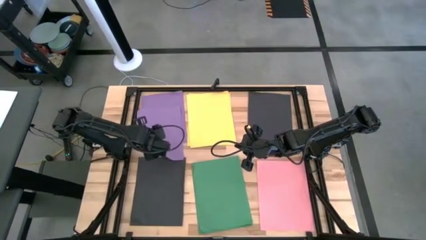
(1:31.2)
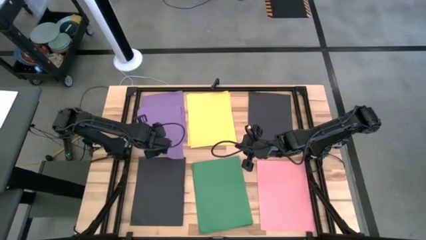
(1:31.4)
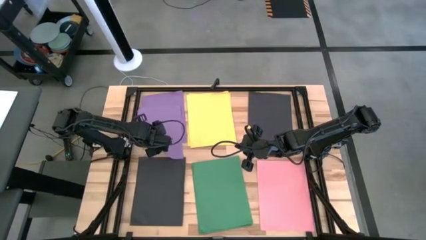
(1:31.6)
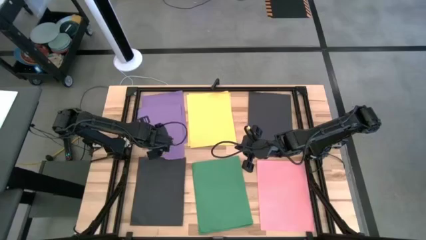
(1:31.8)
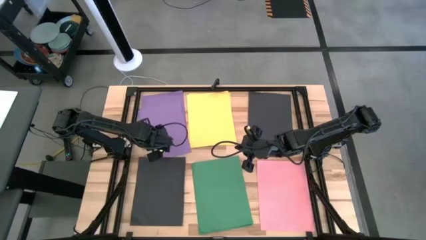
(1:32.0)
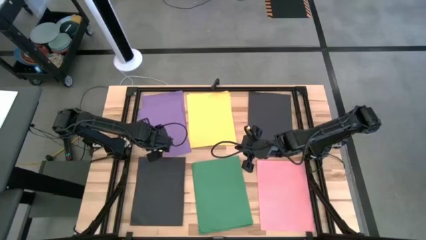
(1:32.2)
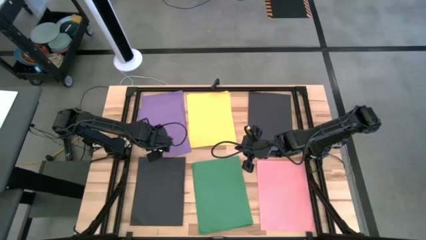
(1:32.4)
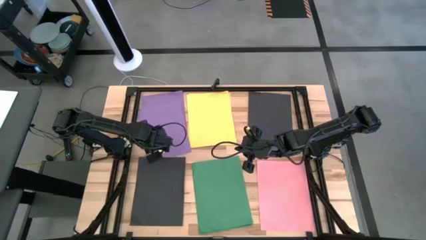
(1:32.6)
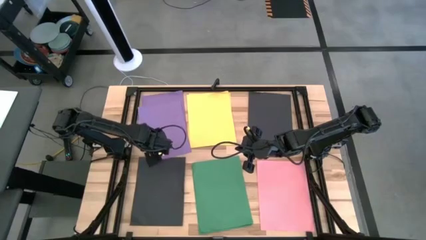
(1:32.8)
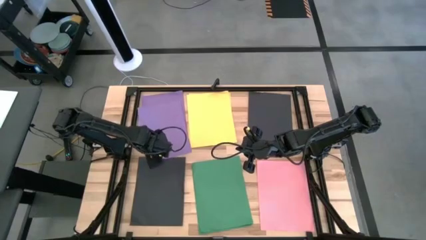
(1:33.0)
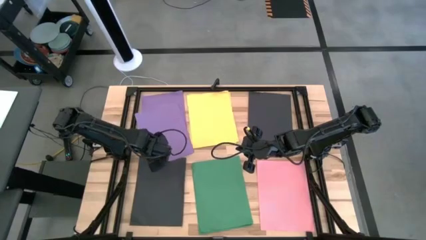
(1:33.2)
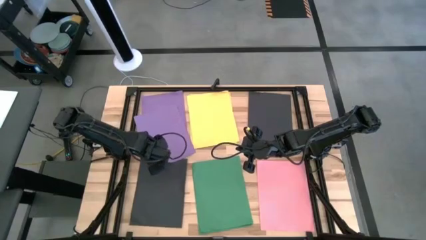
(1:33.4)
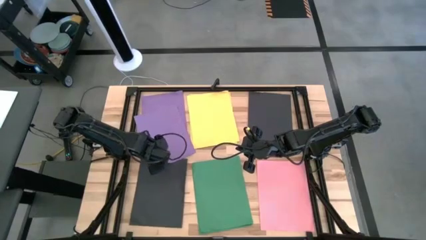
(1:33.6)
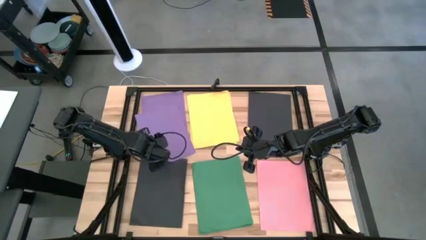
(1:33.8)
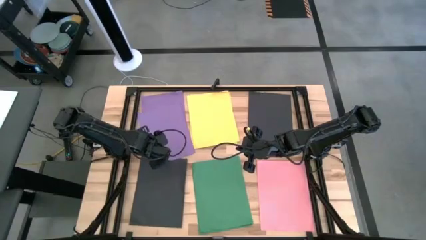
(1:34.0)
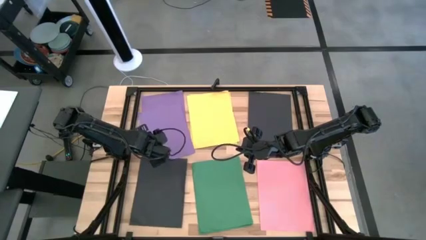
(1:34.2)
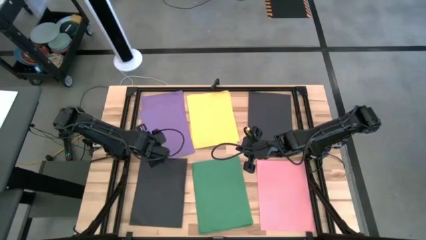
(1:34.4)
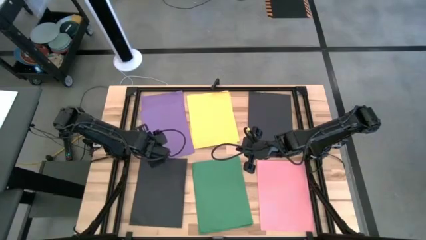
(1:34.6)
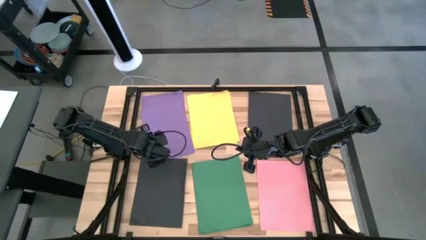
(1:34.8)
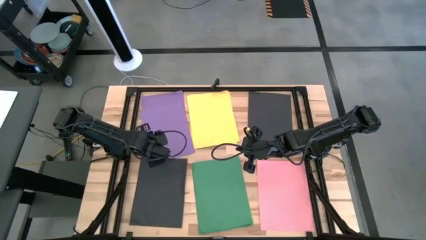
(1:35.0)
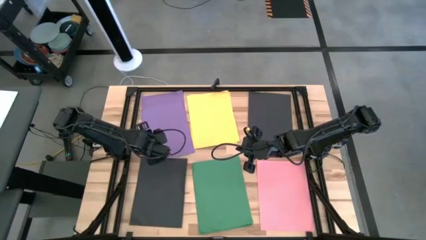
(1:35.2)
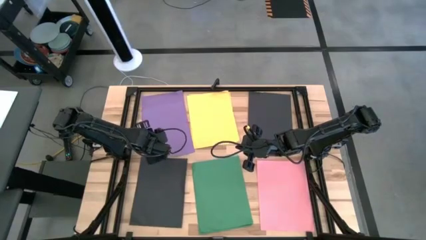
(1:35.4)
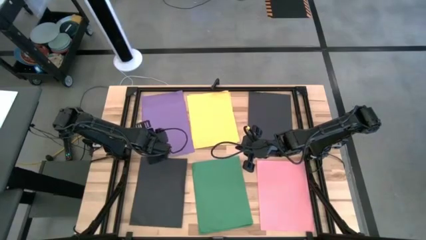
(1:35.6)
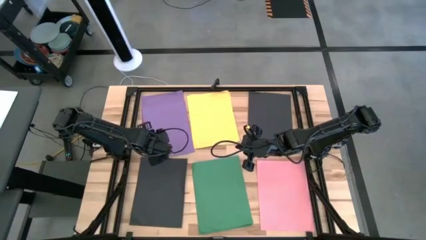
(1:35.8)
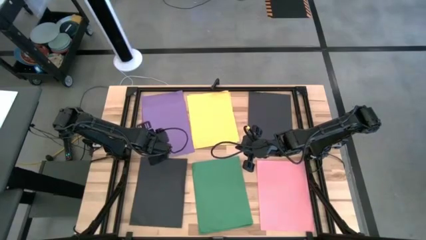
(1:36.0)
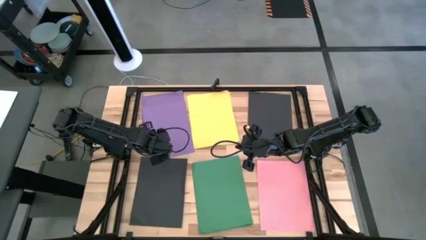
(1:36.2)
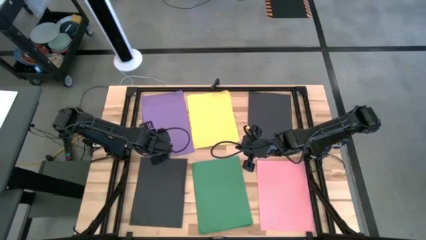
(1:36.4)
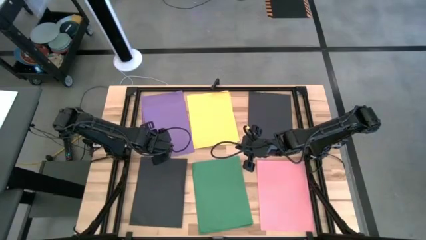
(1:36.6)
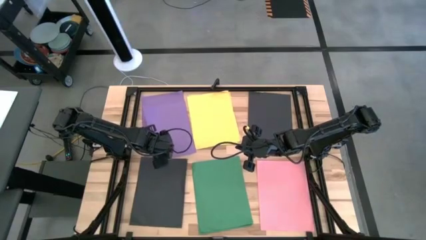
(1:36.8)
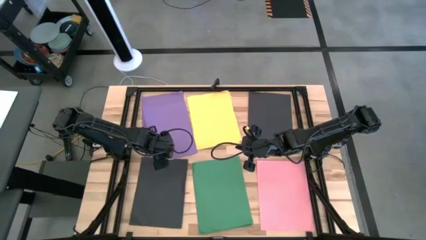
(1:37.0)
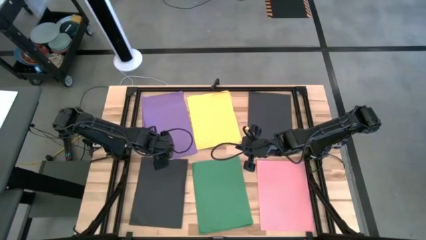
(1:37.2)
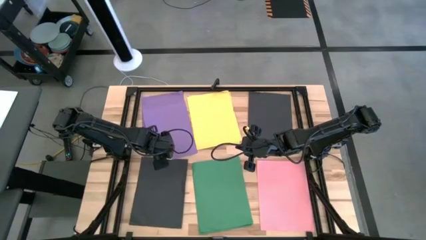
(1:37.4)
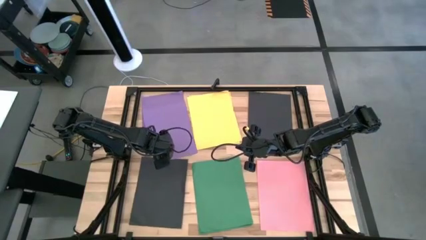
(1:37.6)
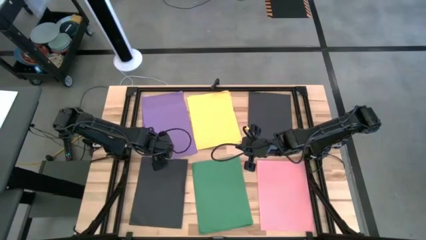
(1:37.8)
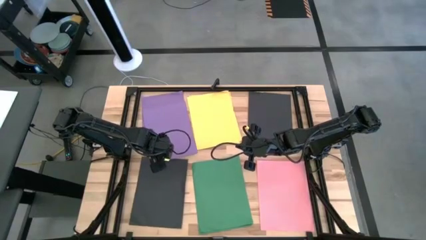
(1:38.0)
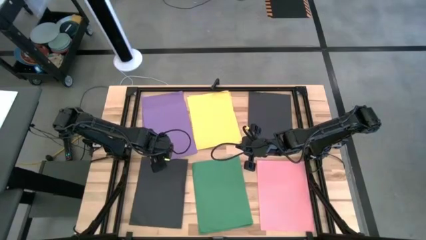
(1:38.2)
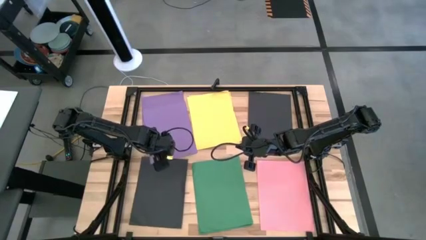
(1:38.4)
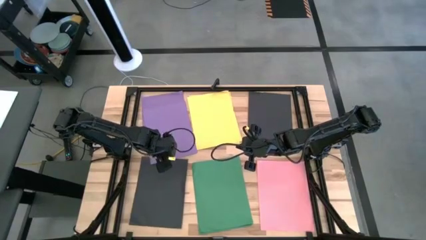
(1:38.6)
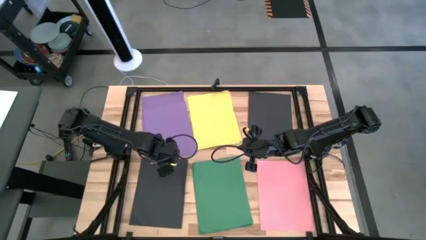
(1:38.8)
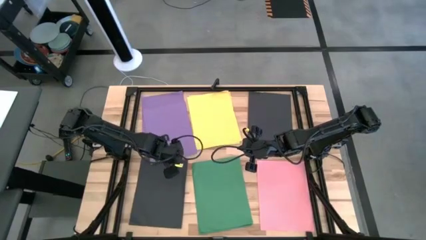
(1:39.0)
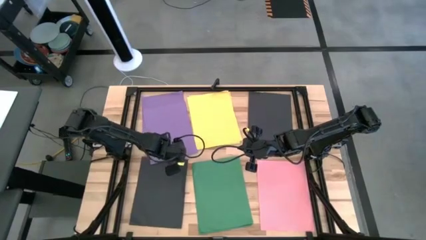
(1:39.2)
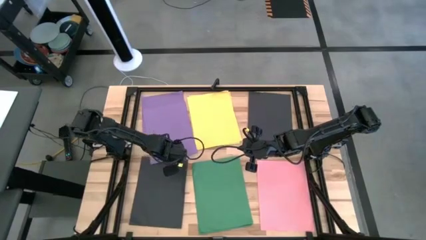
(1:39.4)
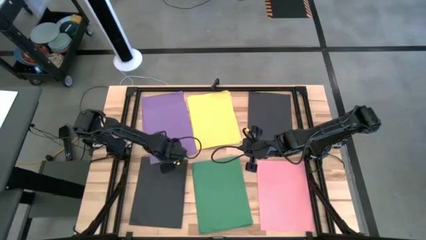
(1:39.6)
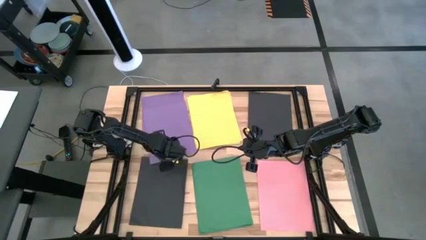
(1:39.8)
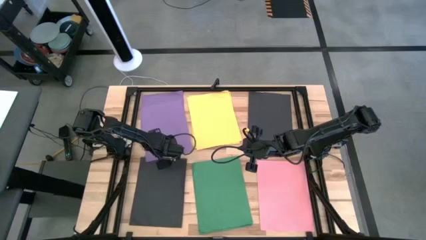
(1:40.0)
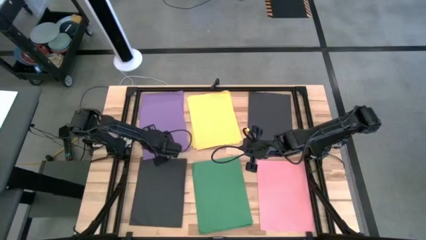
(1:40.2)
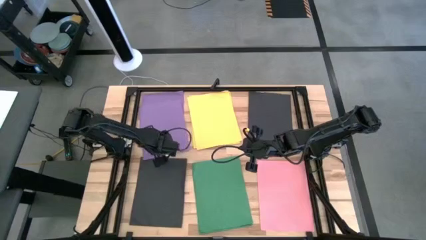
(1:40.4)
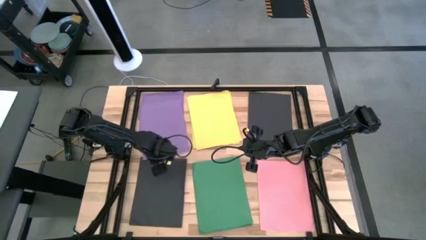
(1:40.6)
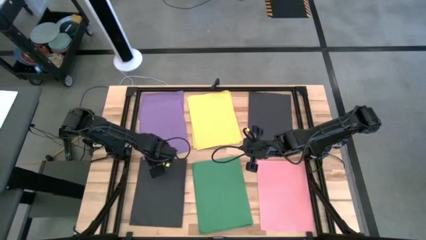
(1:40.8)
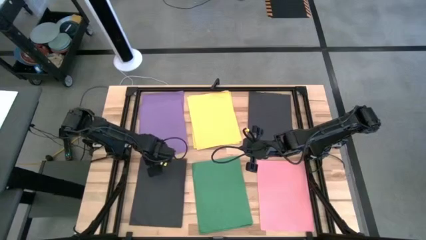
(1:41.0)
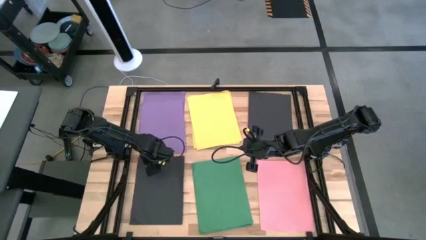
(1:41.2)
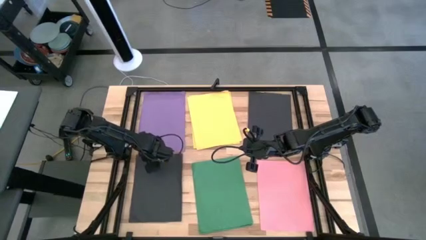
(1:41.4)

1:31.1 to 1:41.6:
Task: Organize paper
Stack the purple paper on top of the purple paper

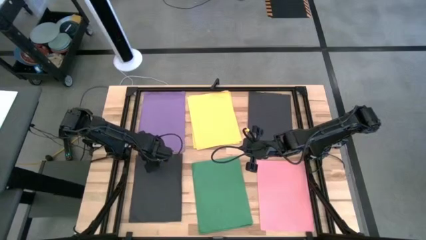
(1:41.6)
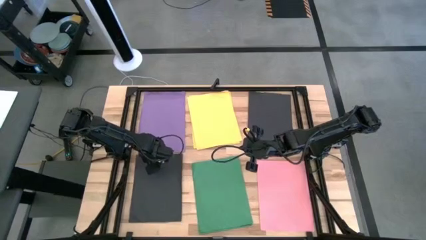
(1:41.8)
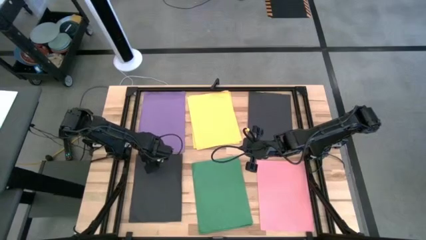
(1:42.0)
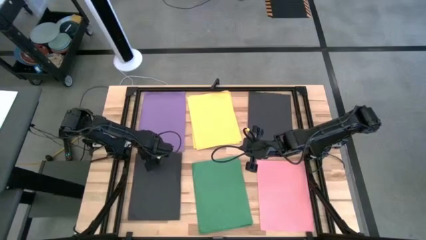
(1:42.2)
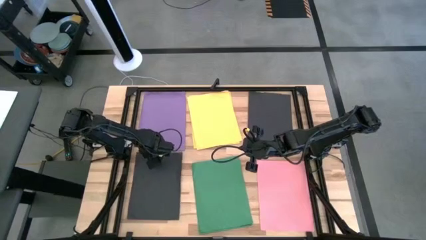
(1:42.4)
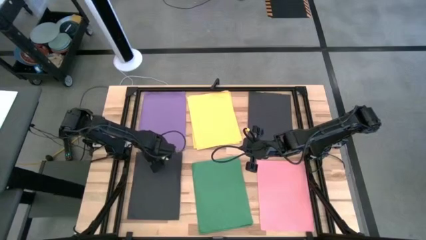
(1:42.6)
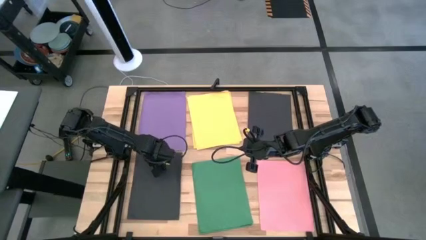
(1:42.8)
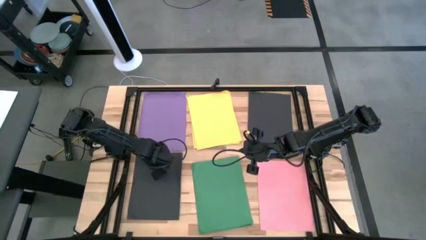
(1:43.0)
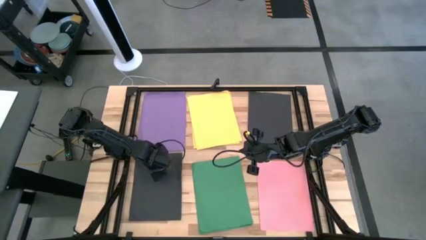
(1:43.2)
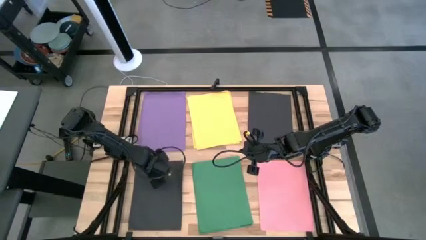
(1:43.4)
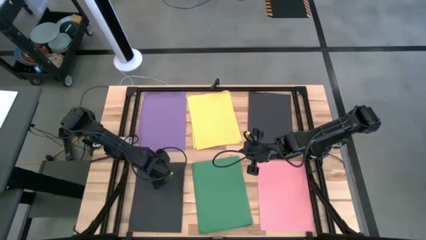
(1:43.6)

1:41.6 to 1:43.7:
Adjust the black paper

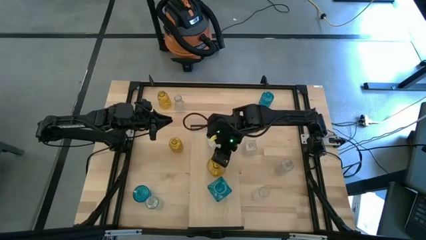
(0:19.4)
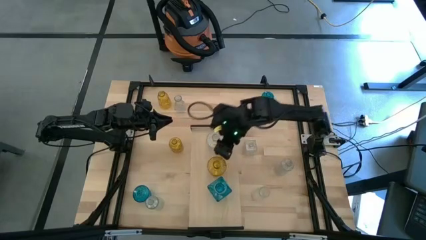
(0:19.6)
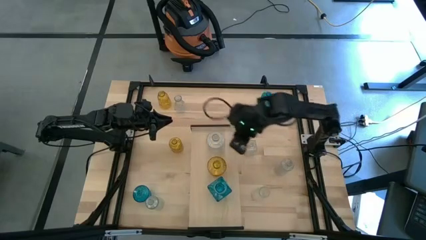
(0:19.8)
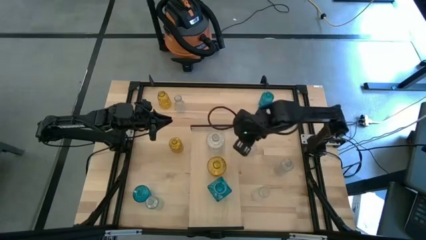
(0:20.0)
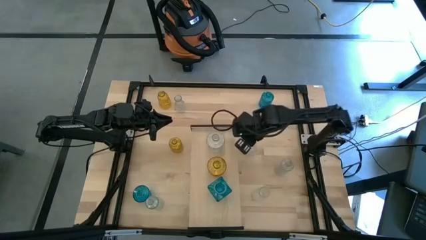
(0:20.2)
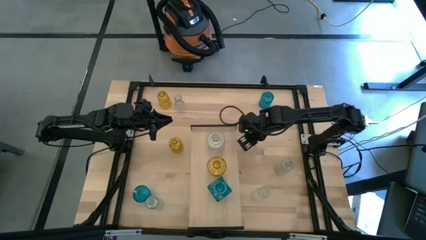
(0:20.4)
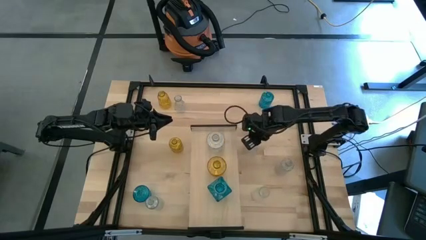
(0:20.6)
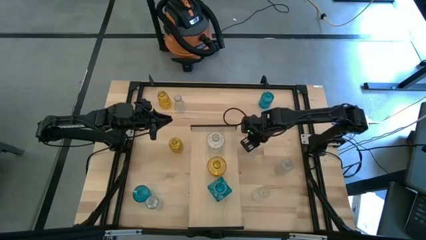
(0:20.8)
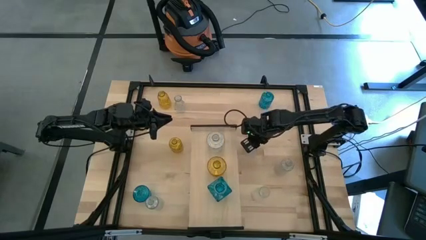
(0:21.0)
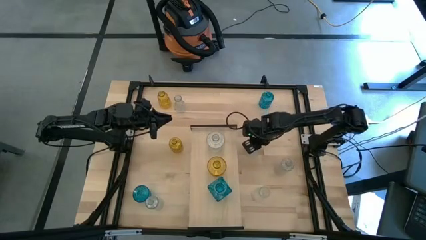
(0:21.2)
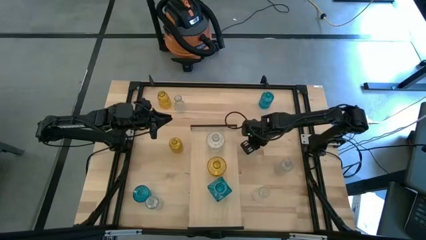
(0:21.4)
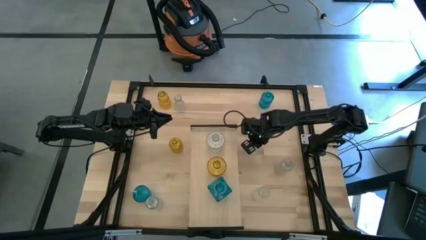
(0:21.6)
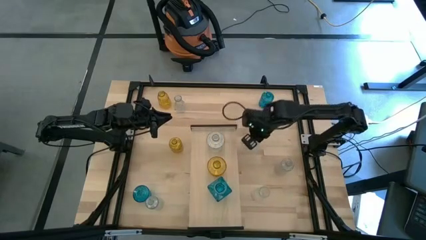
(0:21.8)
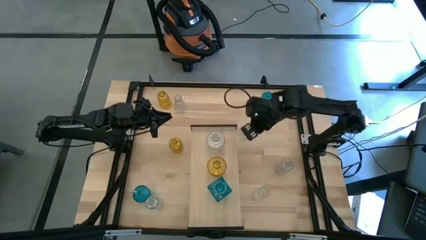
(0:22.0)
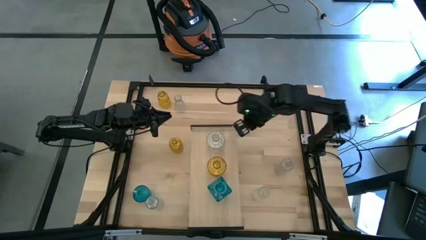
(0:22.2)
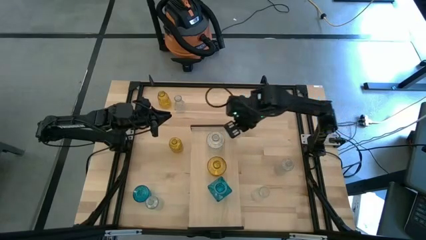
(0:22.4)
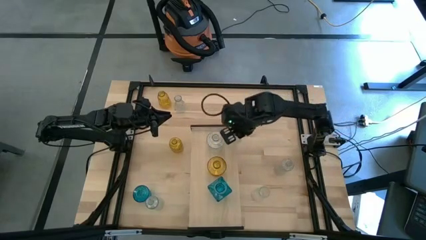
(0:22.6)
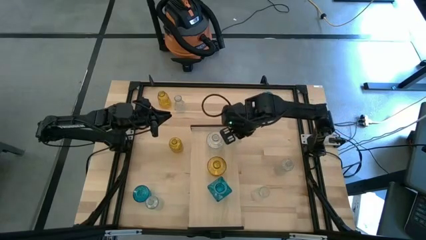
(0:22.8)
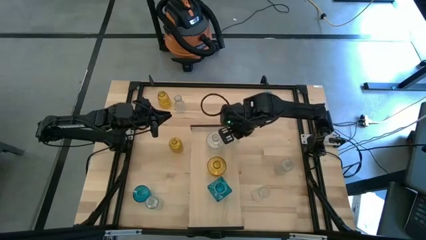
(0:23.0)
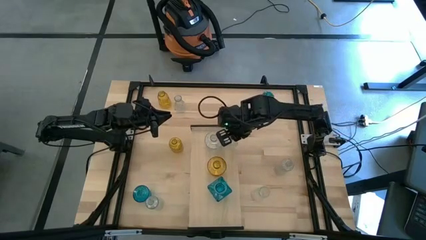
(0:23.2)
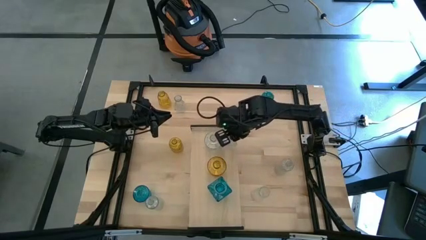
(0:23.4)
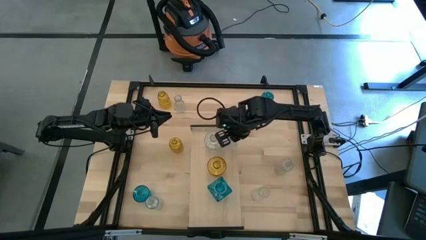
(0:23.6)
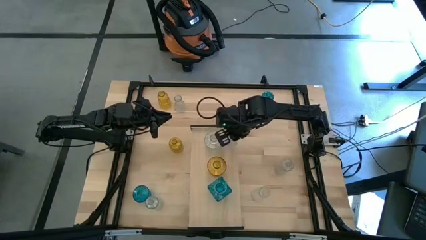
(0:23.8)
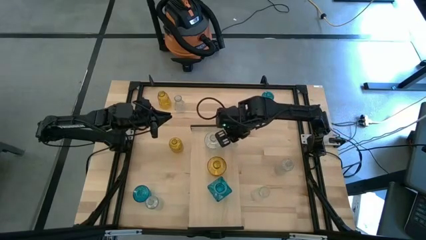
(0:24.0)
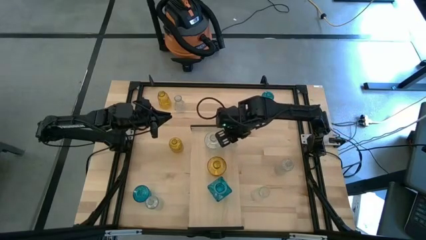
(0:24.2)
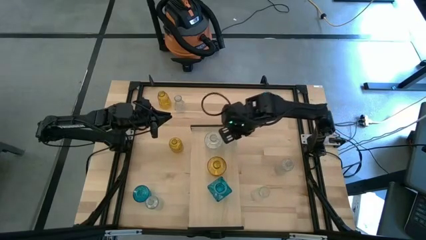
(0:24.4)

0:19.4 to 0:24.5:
Task: sort vases onto shelf
Put the transparent vase on the shelf aligned with the other transparent vase
